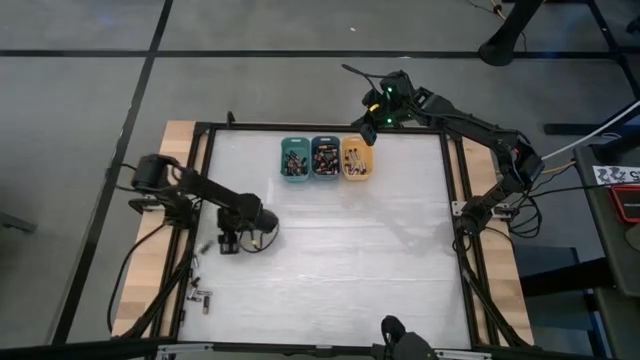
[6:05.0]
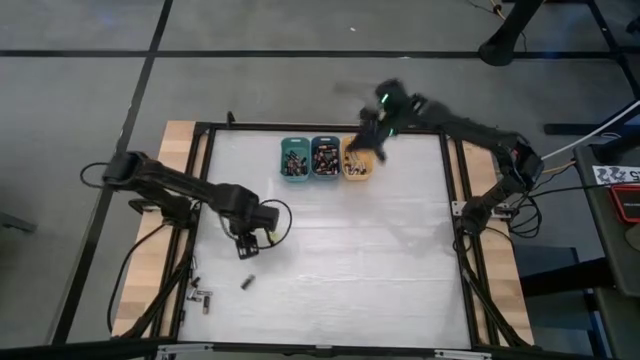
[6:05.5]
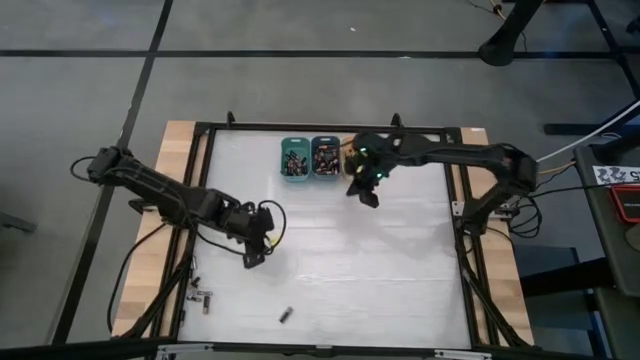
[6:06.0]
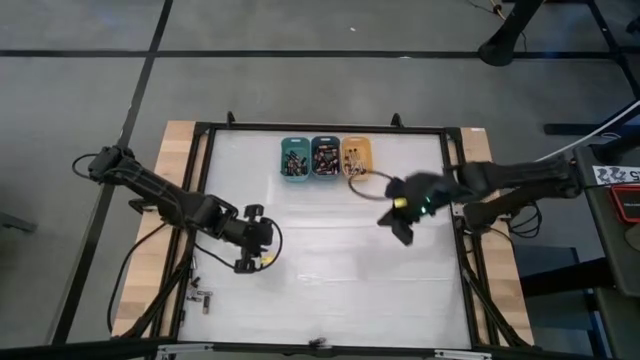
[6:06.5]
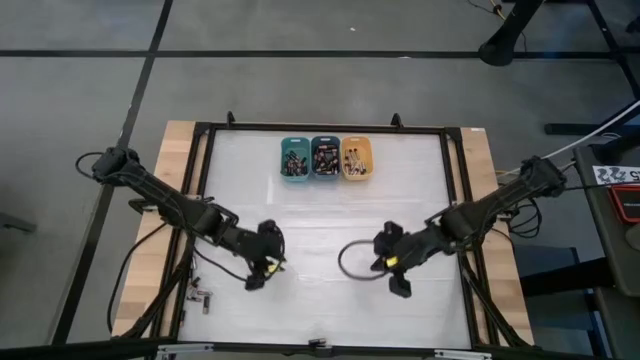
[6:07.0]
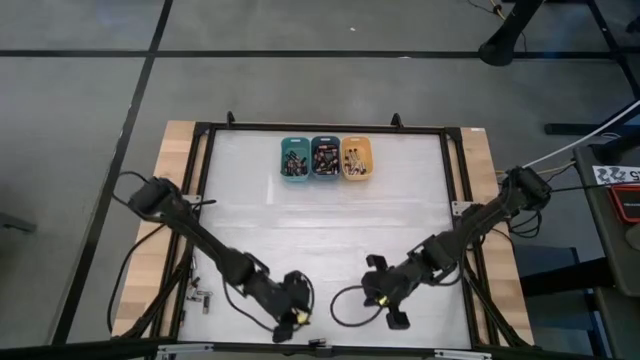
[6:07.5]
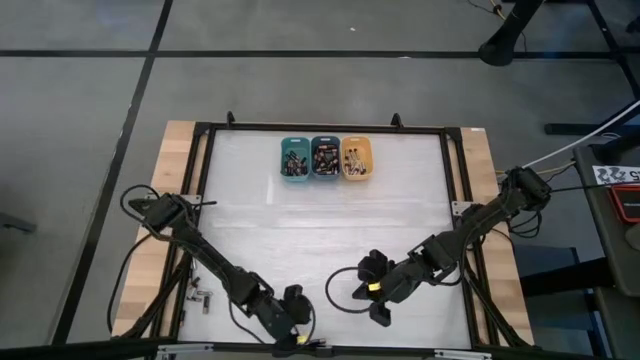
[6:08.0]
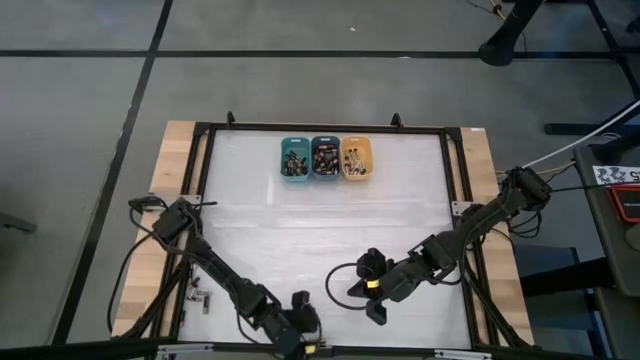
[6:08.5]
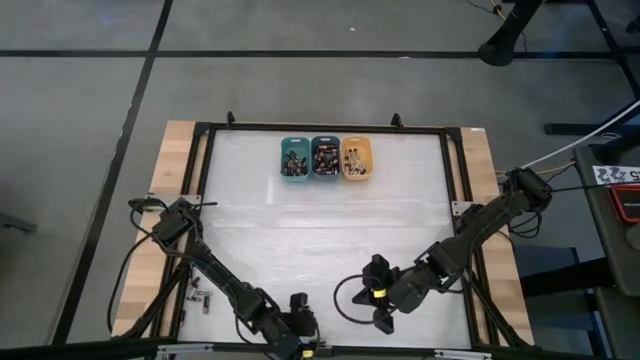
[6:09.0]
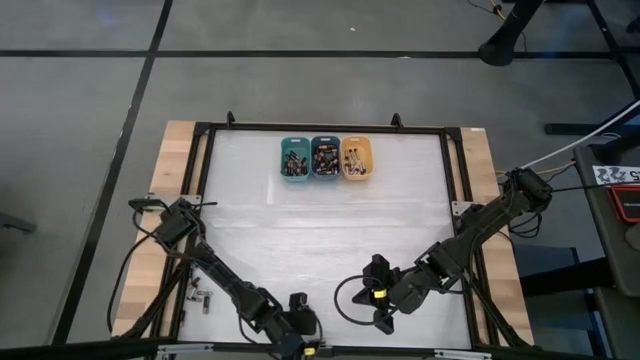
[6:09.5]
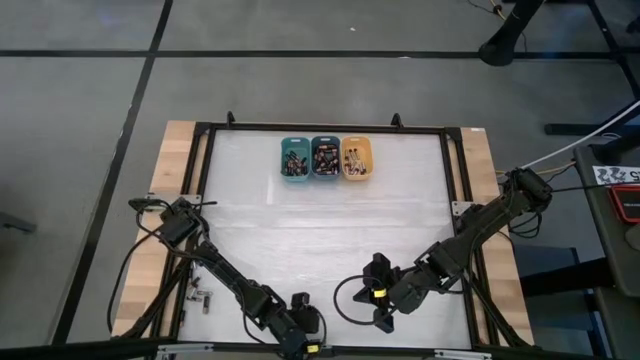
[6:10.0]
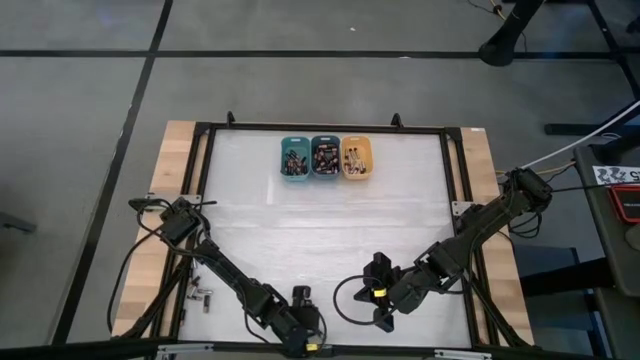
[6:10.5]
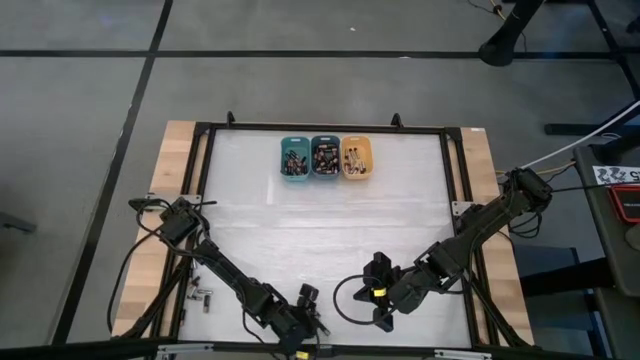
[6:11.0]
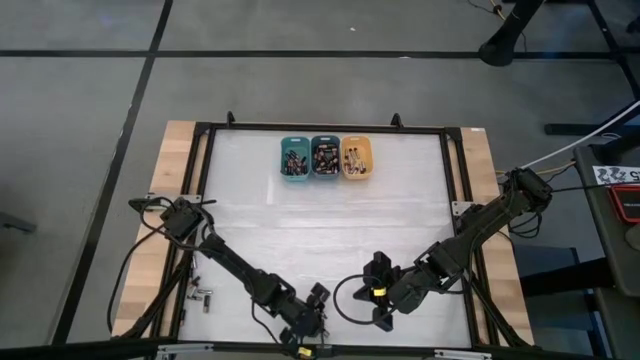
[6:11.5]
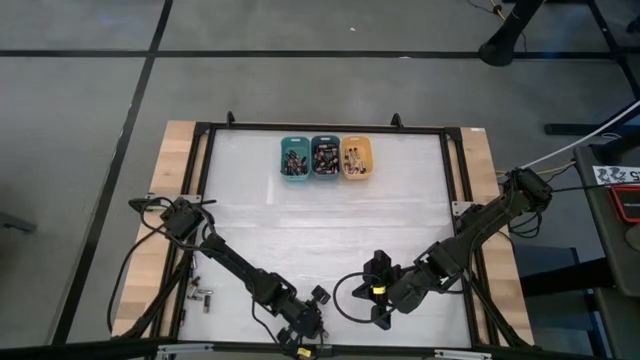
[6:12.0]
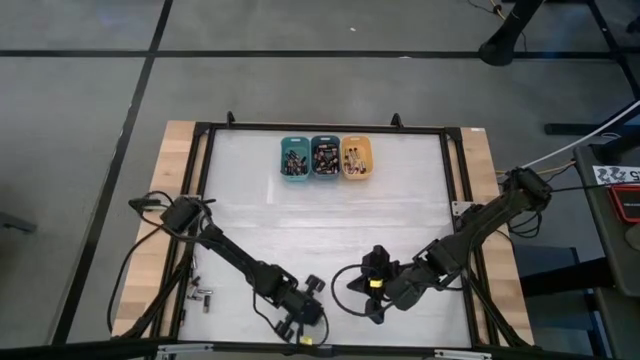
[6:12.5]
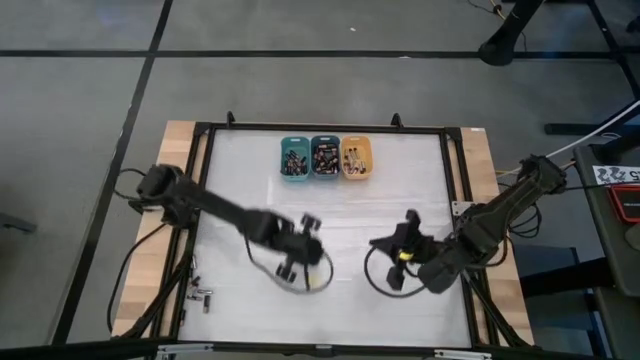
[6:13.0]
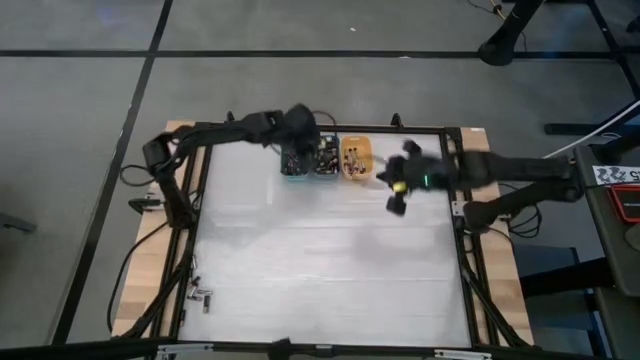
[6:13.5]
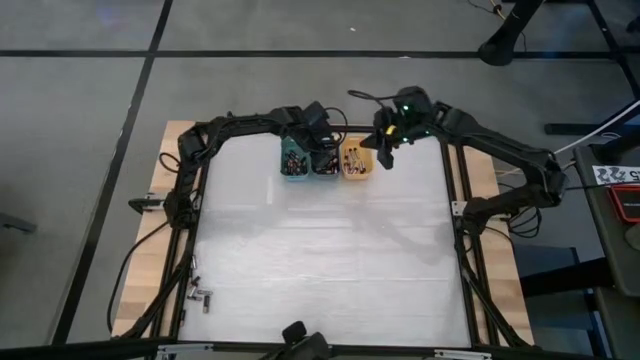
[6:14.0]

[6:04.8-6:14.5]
Task: Sort batteries
Put the brown battery into the blue bin

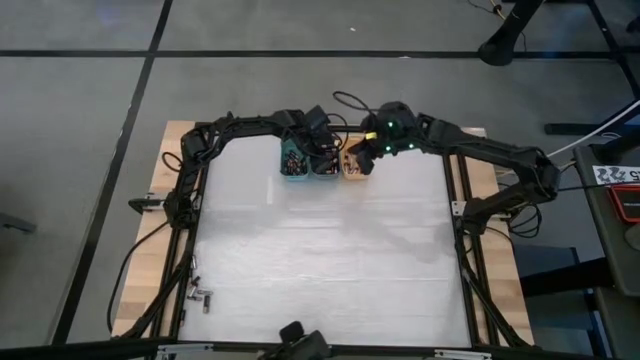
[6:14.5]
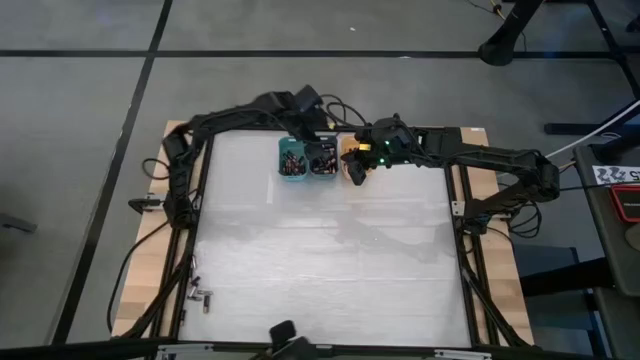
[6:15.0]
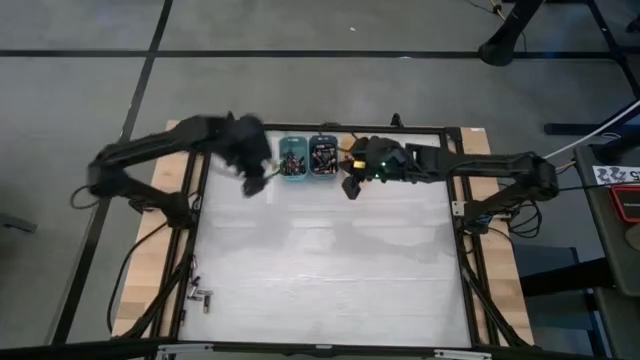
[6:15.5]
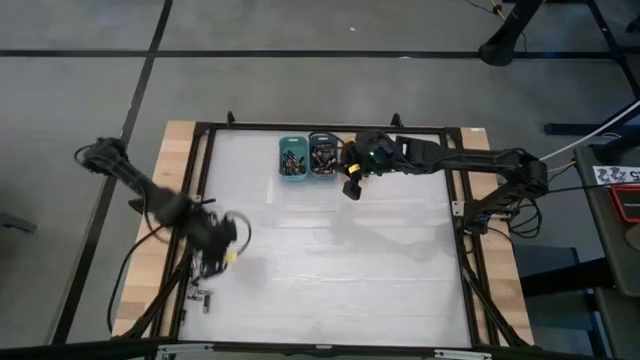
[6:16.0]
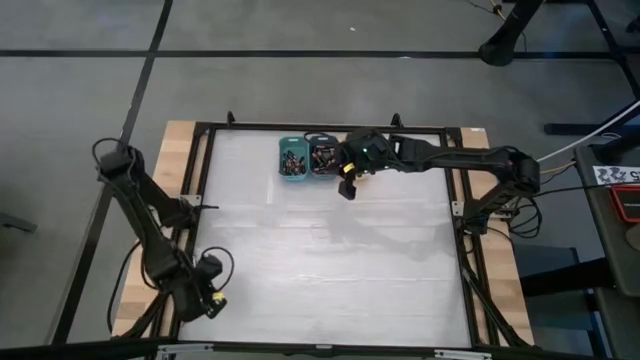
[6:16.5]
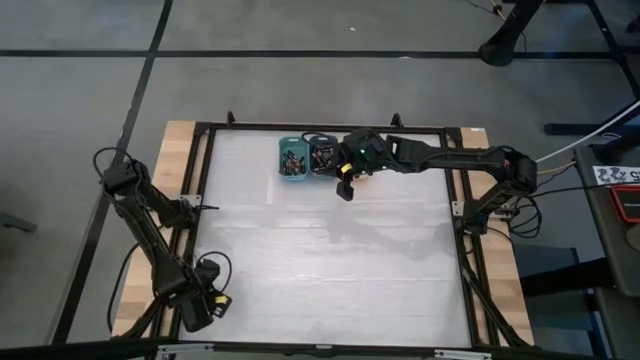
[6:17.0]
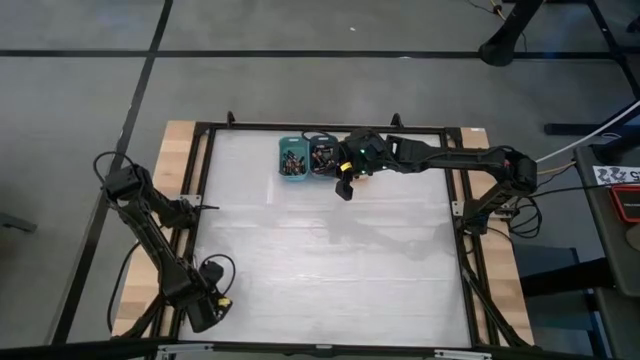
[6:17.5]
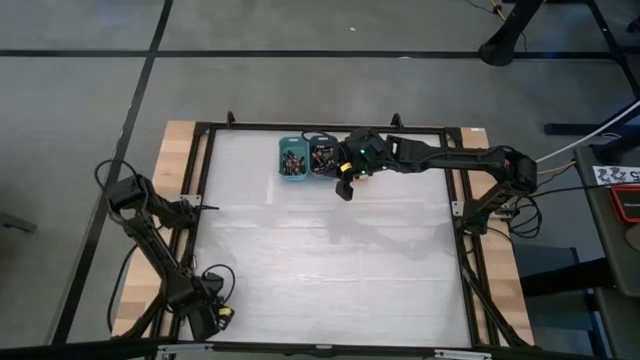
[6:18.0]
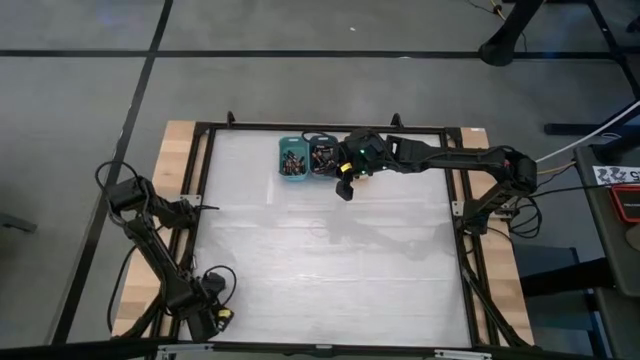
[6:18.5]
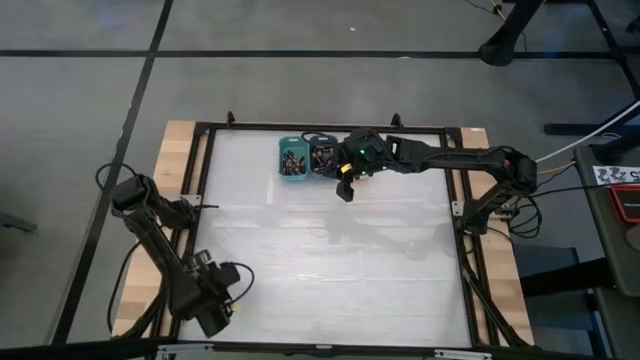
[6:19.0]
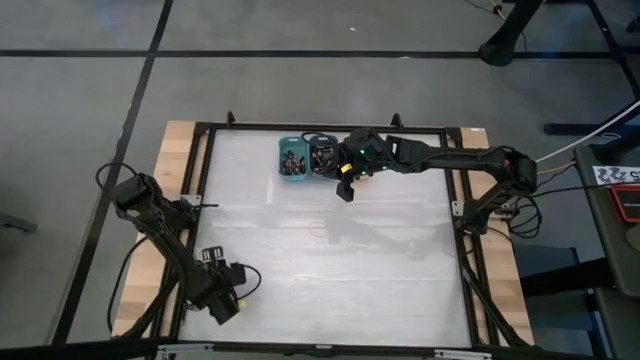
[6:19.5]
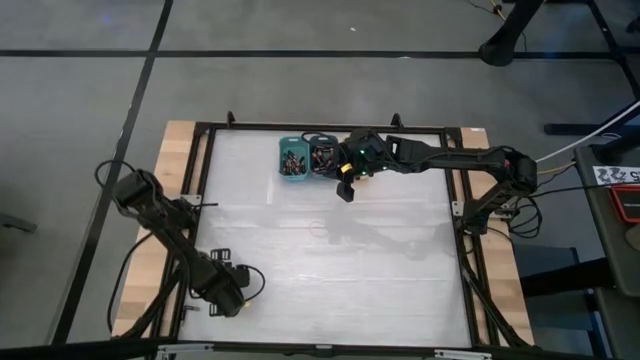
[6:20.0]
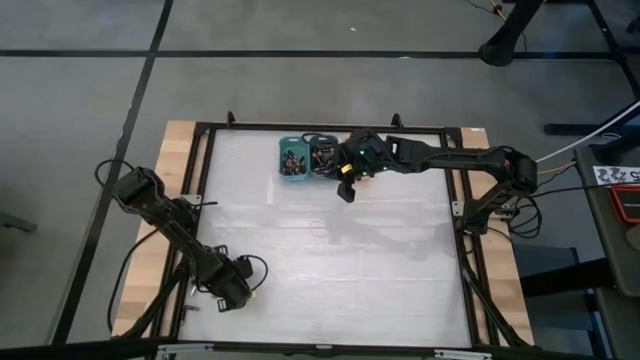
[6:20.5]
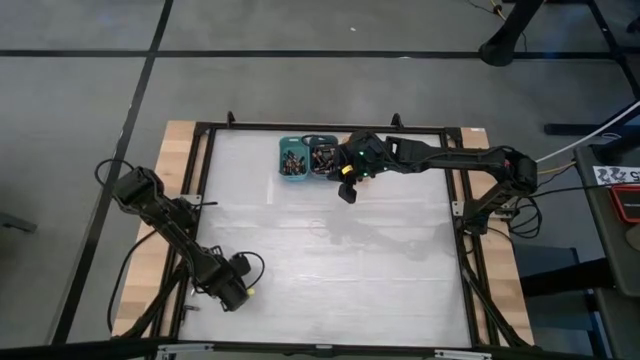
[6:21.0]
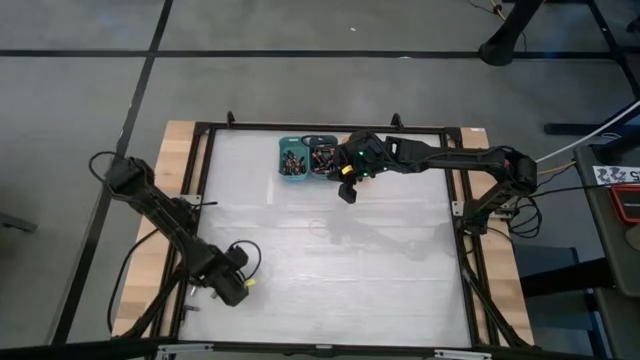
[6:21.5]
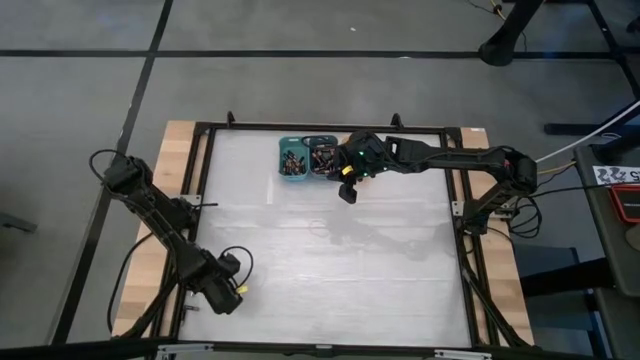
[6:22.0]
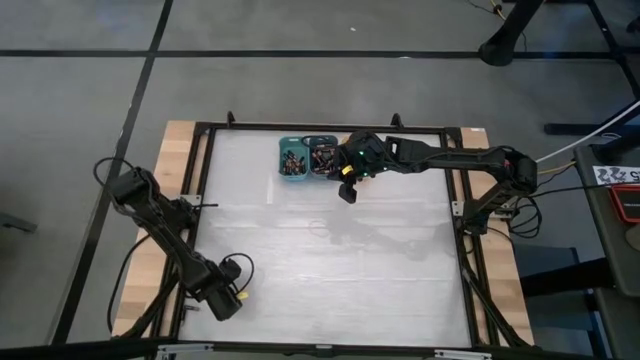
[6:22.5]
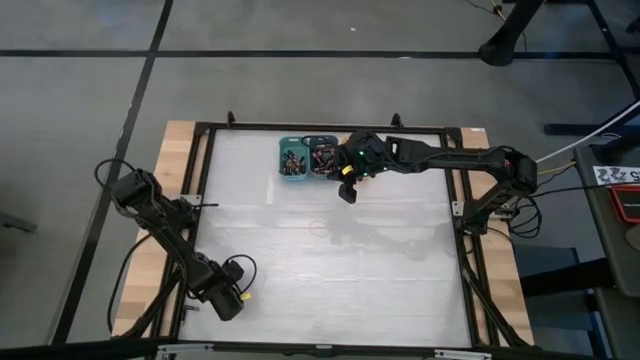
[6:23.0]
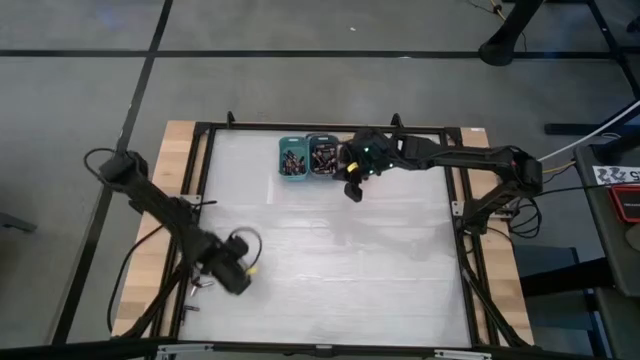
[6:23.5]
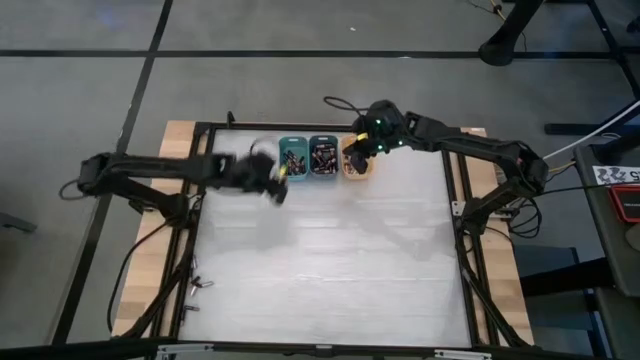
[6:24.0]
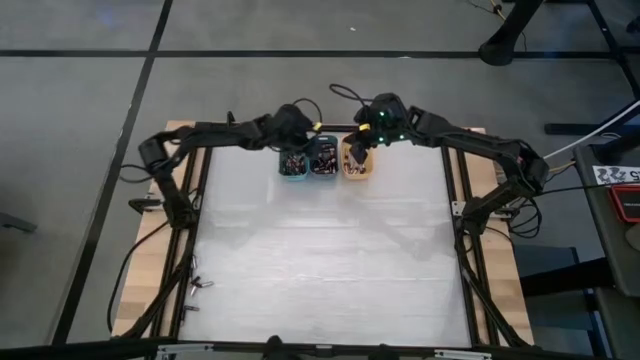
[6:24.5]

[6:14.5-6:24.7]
Put the brown battery into the blue bin
